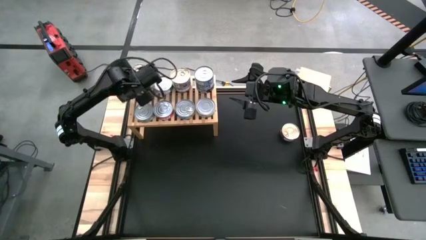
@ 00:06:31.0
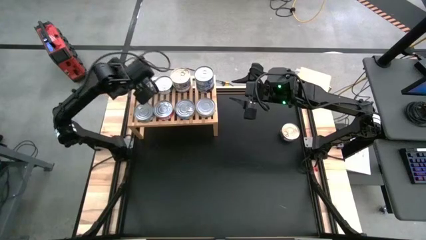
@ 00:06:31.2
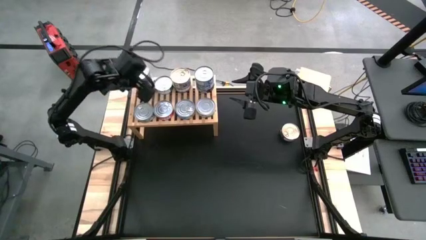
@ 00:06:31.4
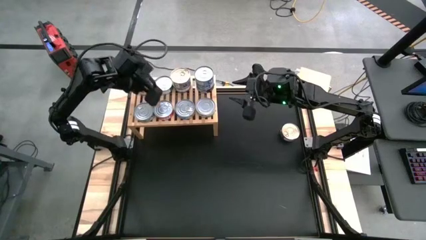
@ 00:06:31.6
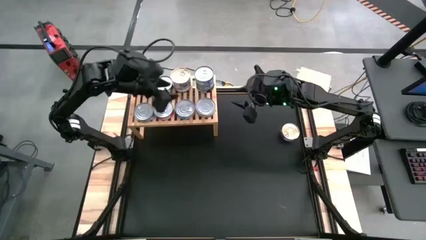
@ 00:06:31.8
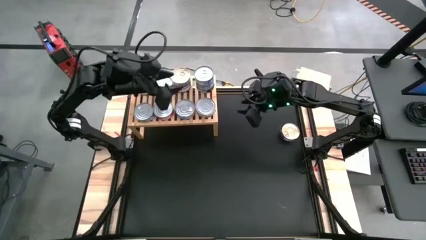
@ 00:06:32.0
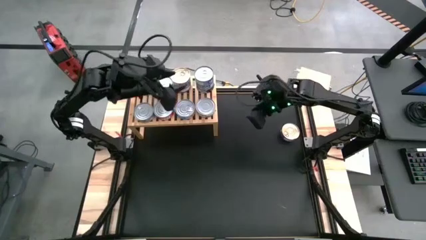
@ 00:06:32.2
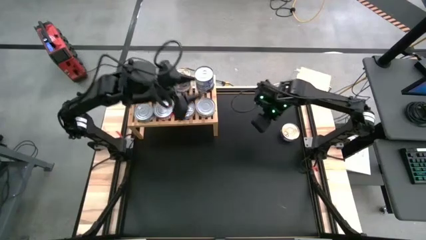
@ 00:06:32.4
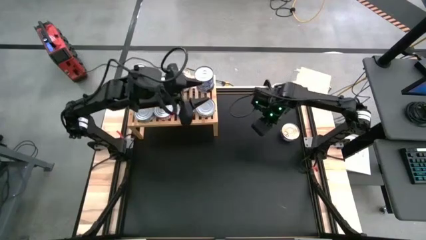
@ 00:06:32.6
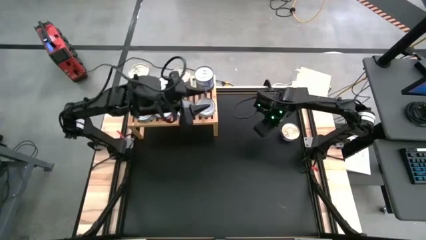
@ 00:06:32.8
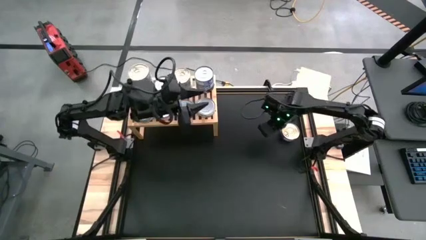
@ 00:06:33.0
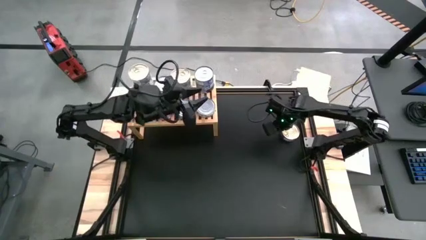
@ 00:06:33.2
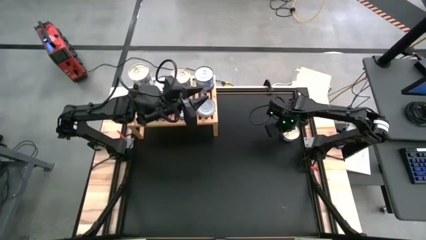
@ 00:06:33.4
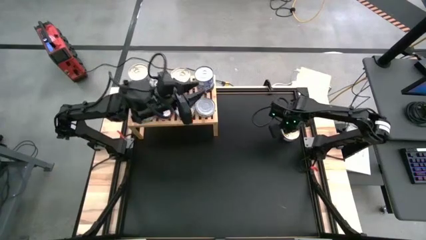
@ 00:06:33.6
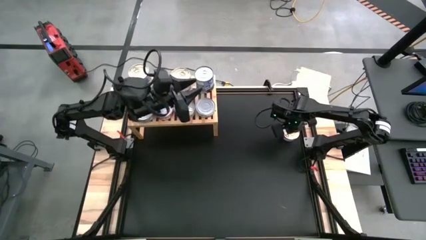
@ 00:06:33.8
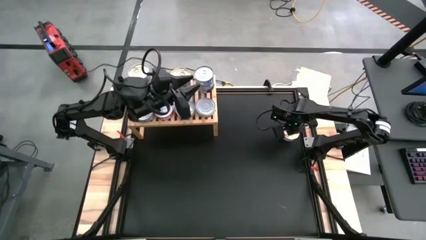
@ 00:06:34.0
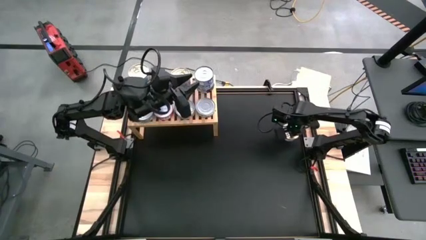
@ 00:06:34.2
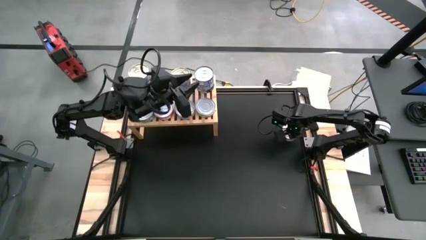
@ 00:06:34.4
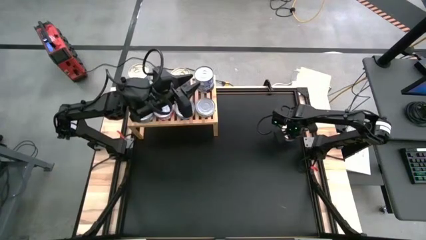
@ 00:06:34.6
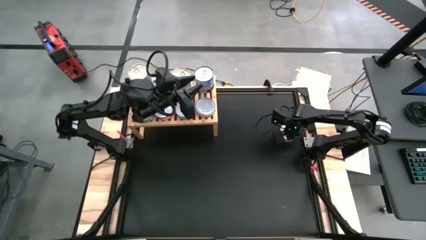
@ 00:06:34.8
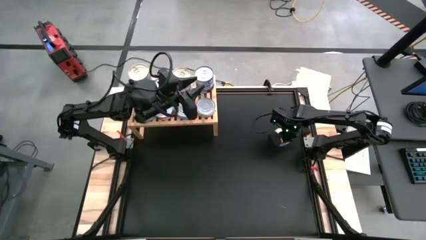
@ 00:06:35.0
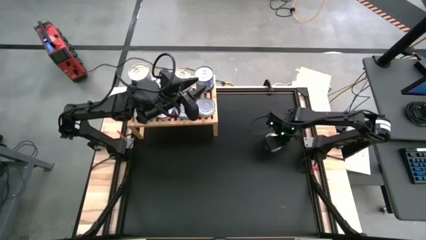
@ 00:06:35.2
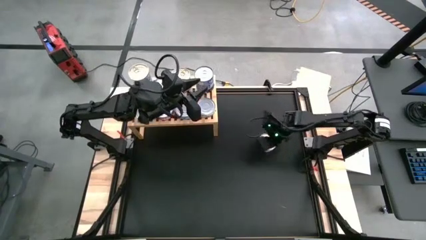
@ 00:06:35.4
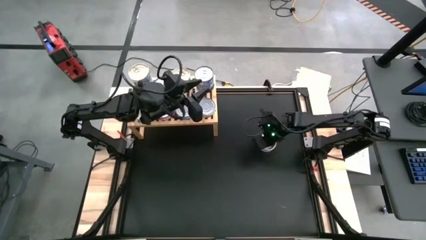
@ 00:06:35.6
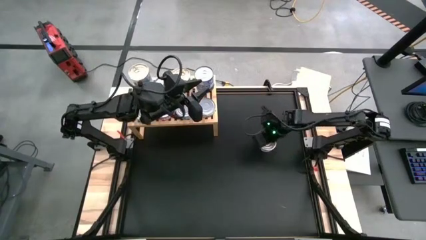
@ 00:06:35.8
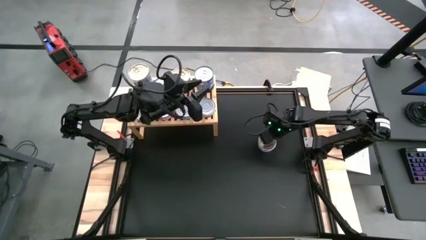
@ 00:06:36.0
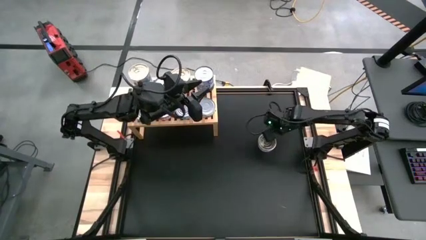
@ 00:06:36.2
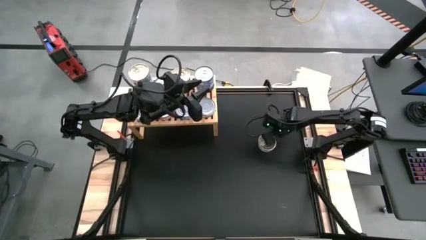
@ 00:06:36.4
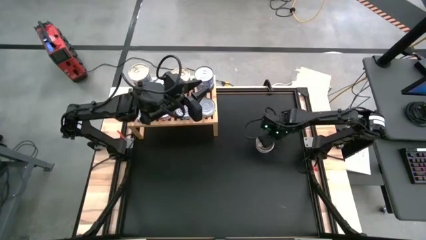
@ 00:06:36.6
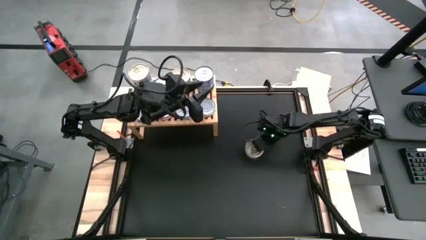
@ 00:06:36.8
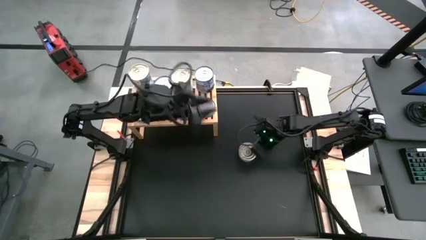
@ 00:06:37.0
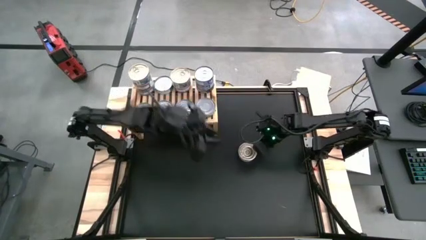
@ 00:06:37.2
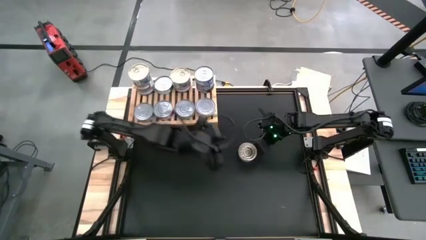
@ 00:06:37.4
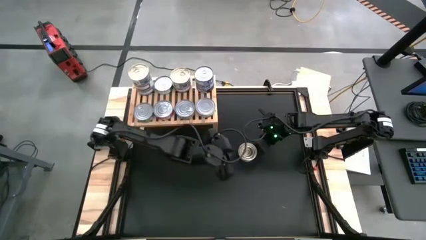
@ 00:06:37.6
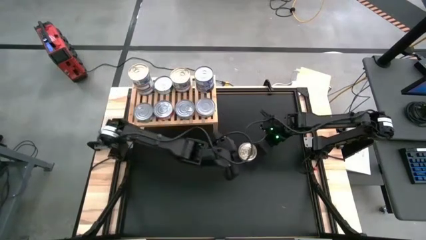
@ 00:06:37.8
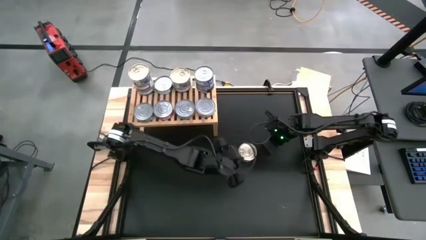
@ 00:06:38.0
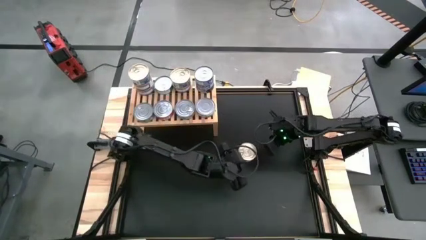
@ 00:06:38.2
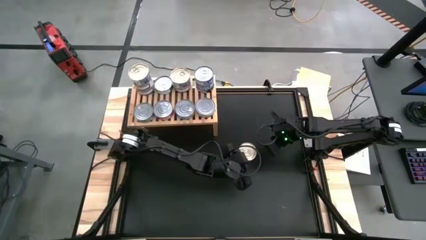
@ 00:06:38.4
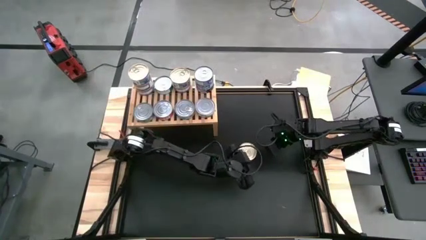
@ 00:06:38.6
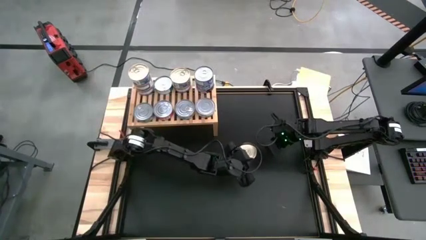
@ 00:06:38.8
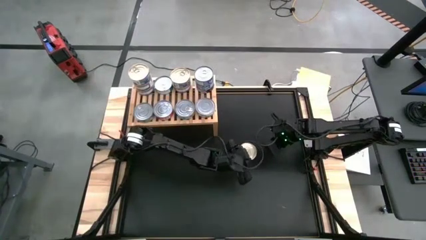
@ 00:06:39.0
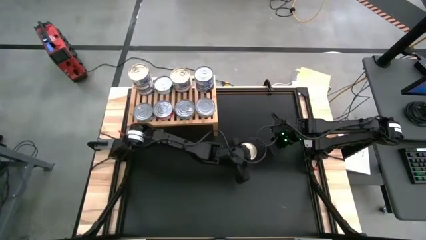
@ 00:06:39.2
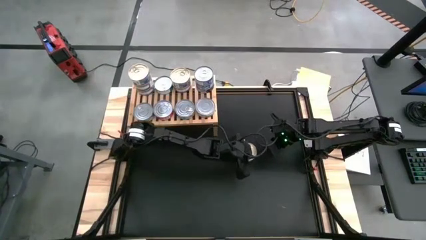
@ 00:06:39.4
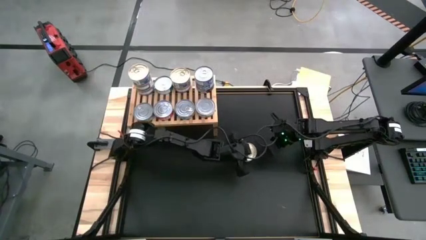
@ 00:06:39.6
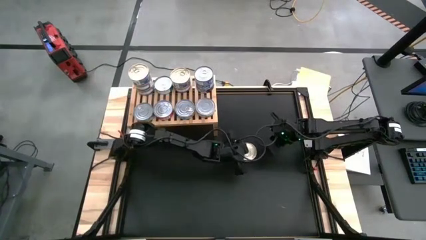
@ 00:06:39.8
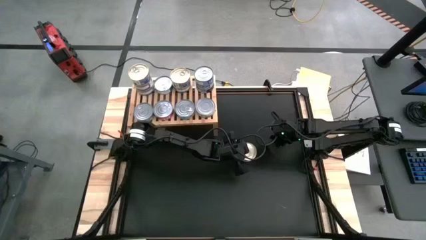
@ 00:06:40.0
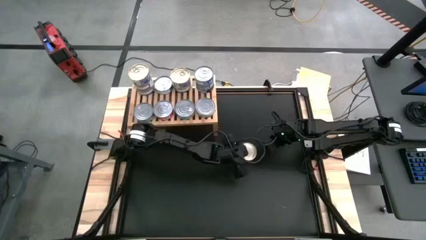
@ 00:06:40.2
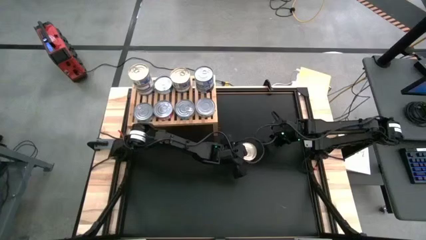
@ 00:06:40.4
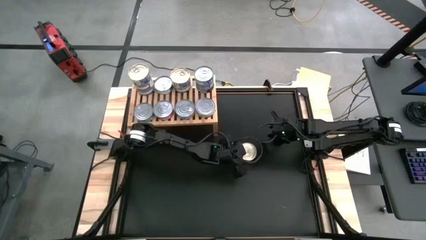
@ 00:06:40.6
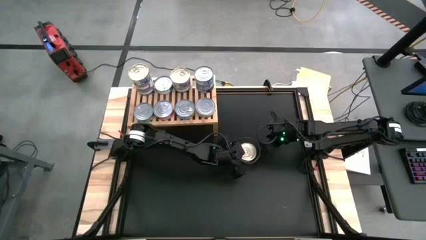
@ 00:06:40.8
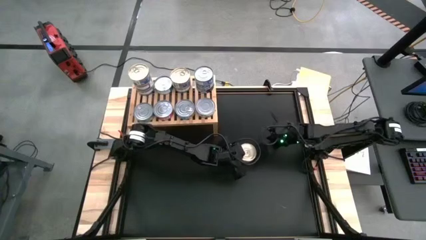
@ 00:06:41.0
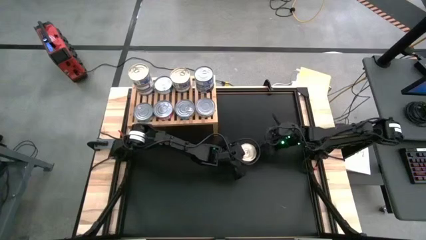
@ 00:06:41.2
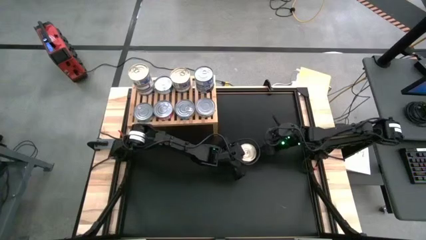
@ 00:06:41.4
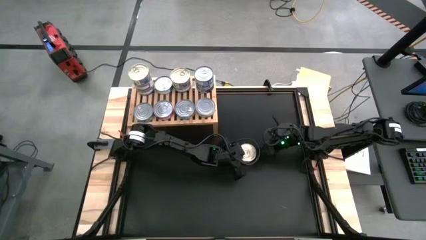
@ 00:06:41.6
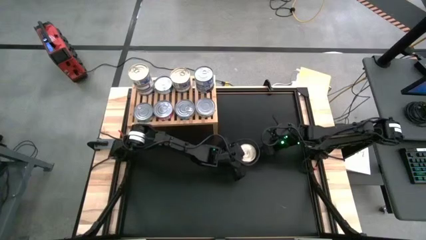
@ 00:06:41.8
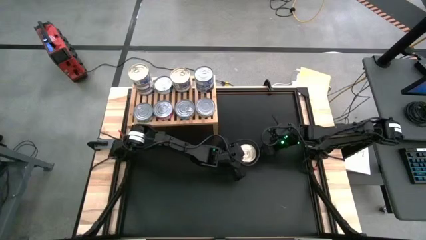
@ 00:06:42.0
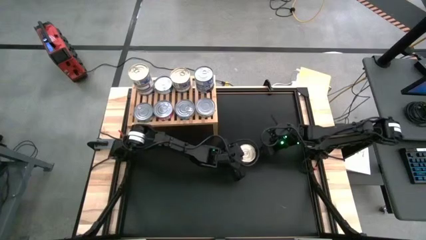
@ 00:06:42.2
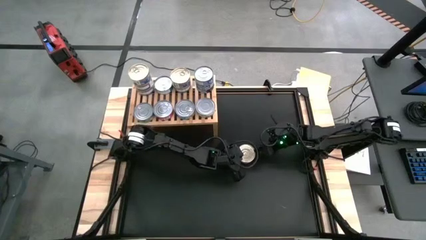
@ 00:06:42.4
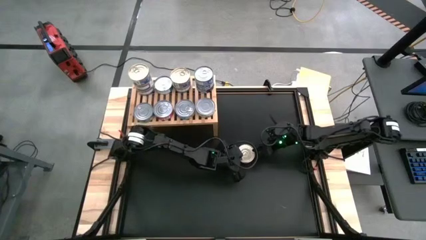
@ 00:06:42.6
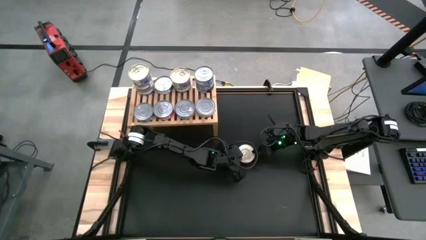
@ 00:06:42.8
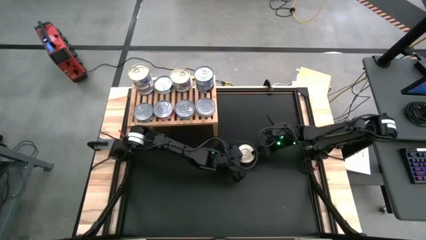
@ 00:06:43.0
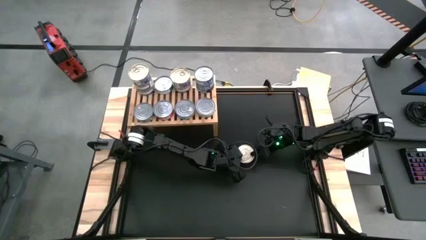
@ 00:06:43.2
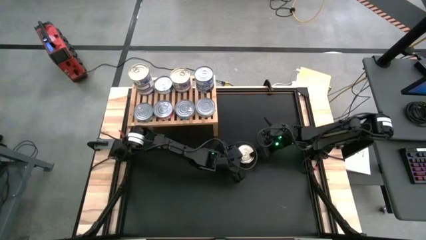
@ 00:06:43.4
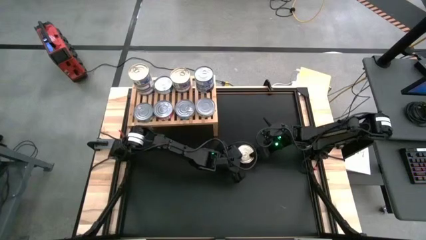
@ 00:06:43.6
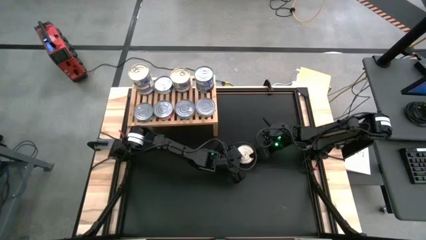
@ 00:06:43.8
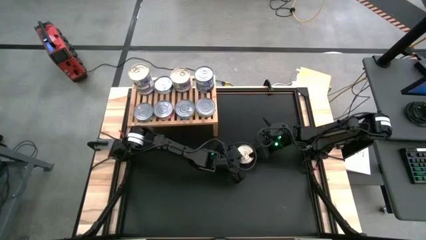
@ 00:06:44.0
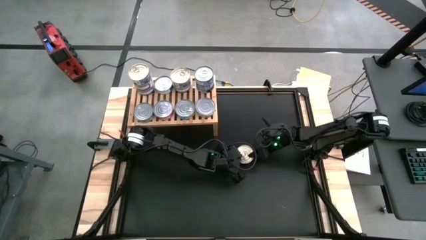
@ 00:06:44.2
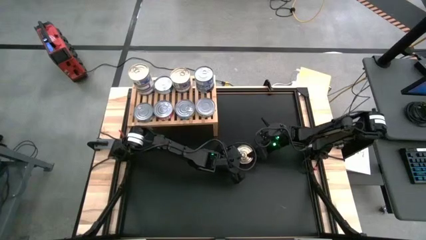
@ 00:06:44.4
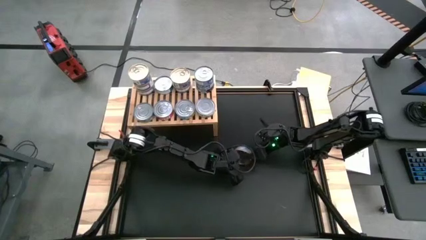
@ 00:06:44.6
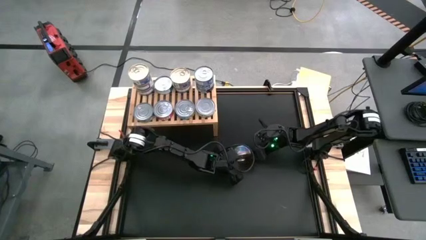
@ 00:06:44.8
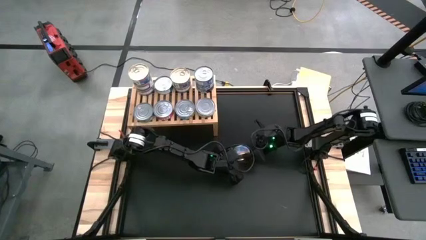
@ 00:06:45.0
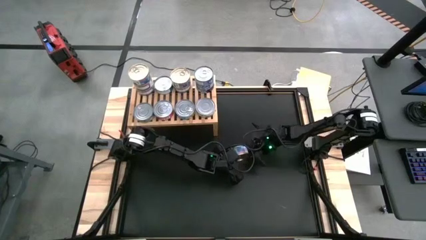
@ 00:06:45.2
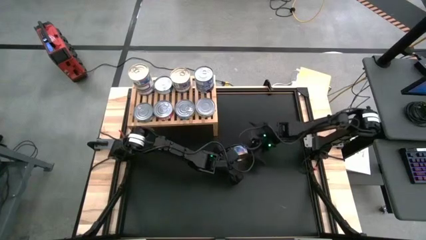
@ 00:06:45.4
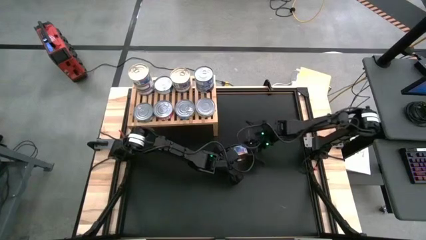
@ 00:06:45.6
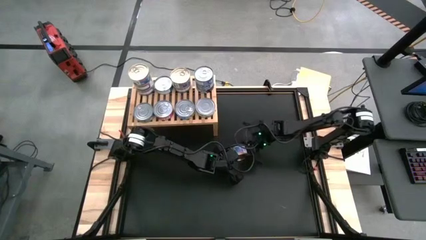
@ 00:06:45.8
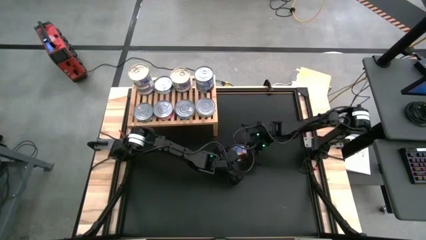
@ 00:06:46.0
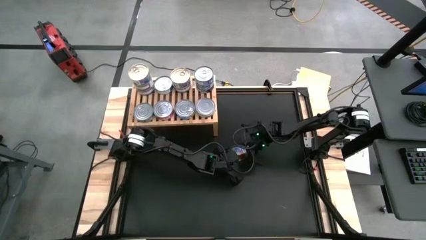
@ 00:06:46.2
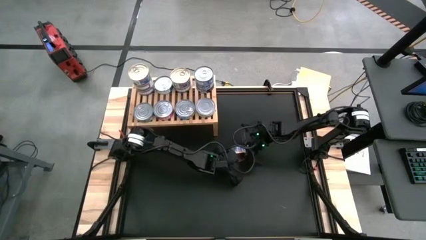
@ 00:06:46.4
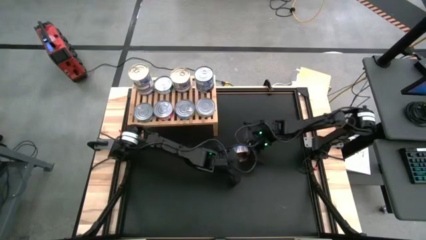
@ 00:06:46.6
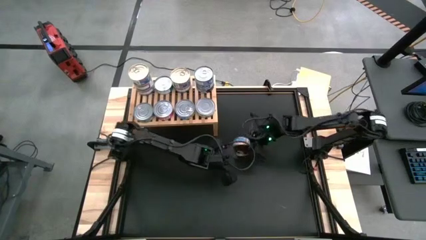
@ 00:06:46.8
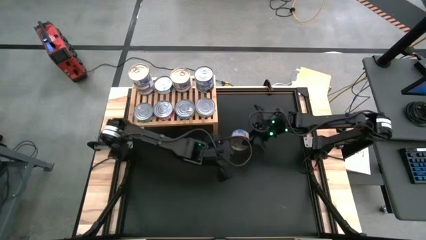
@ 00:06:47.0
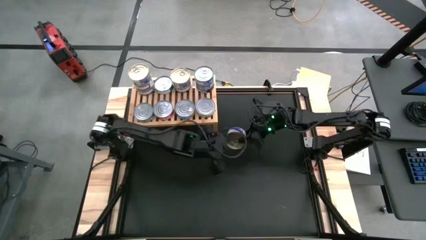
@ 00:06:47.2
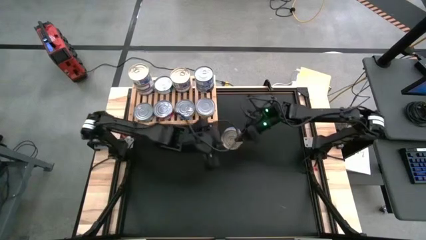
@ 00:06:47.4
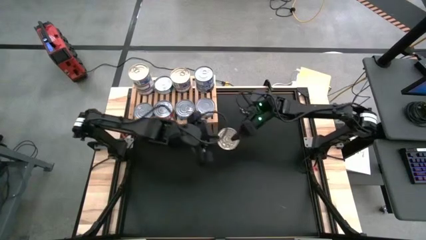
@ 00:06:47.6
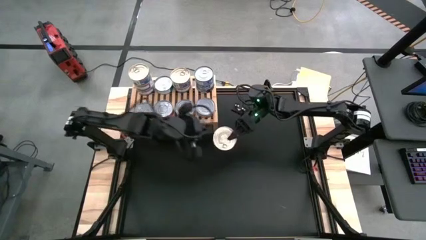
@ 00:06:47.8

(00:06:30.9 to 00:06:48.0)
Task: Stack canned seafood by type on shelf
Stack the blue pink tuna can on top of the other blue pink tuna can on the shelf
